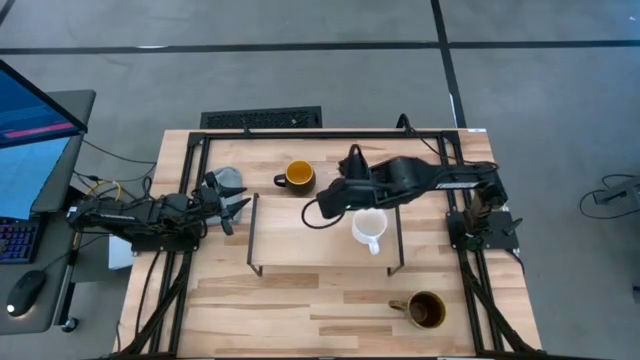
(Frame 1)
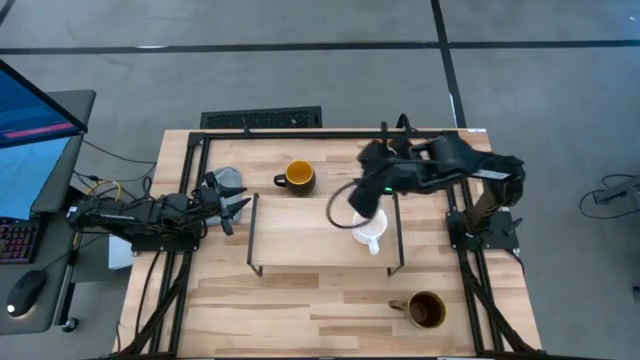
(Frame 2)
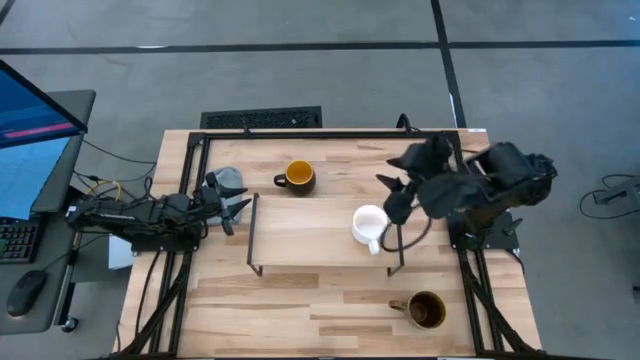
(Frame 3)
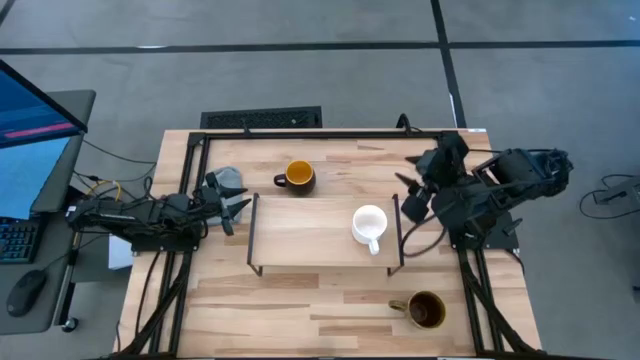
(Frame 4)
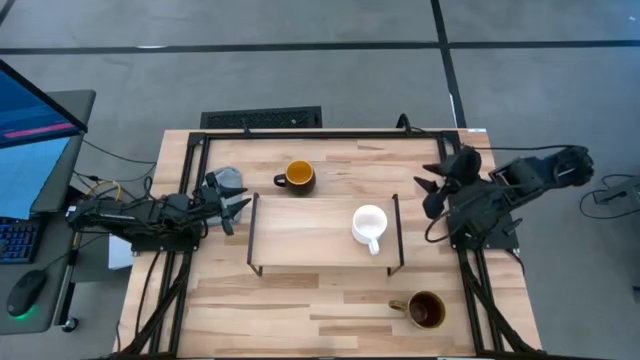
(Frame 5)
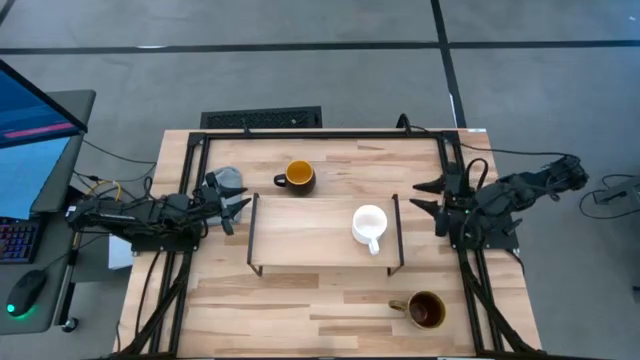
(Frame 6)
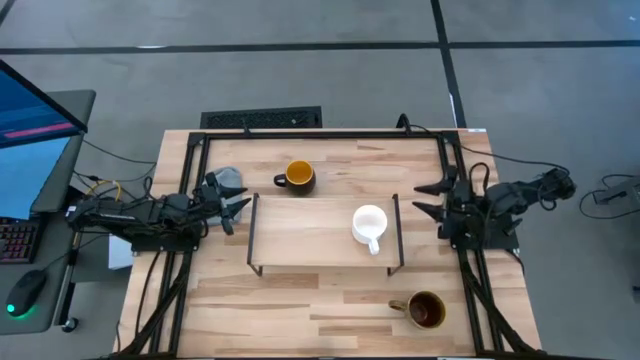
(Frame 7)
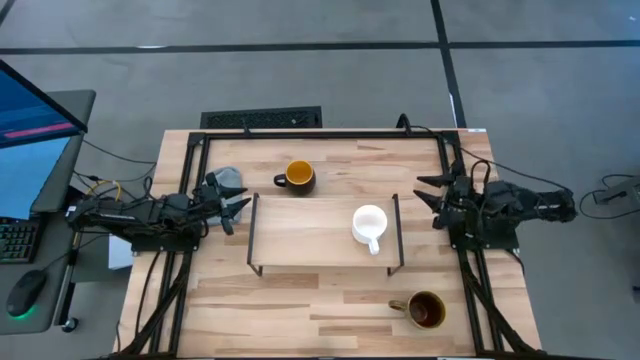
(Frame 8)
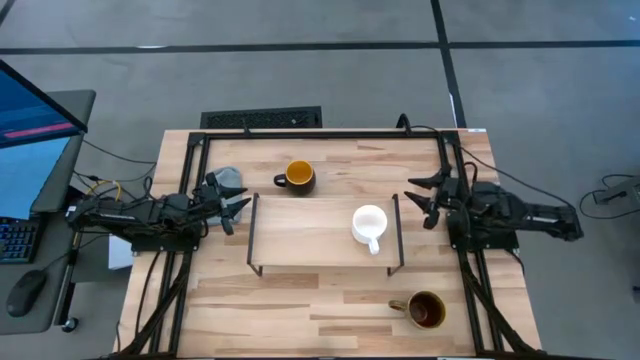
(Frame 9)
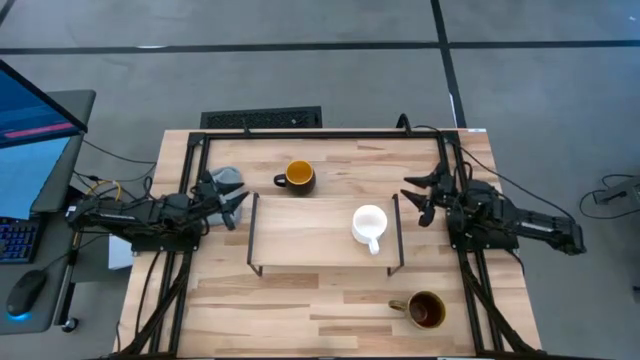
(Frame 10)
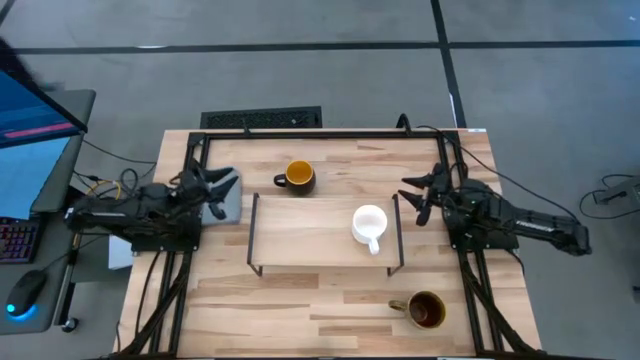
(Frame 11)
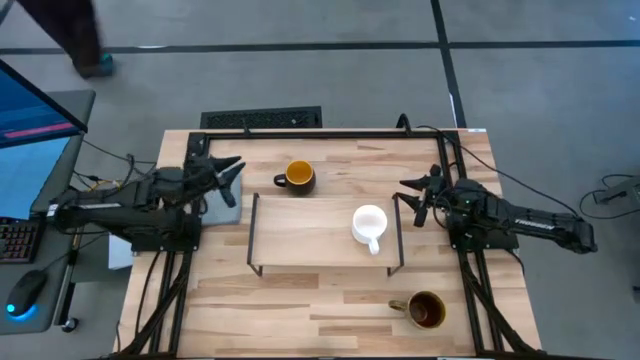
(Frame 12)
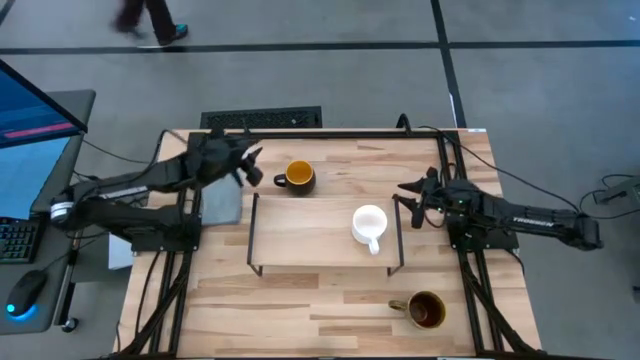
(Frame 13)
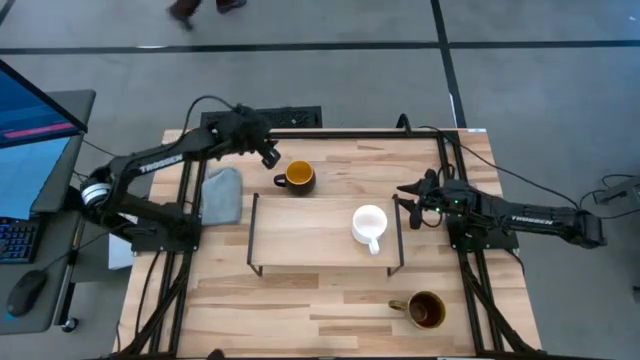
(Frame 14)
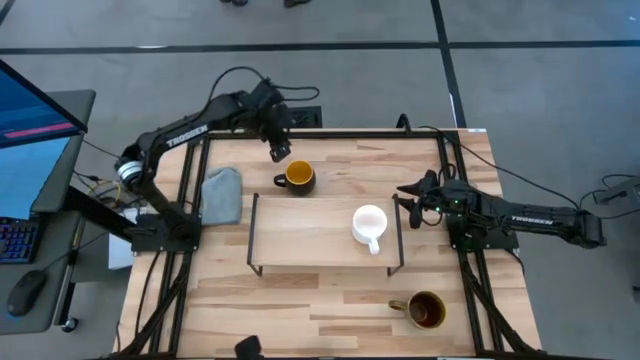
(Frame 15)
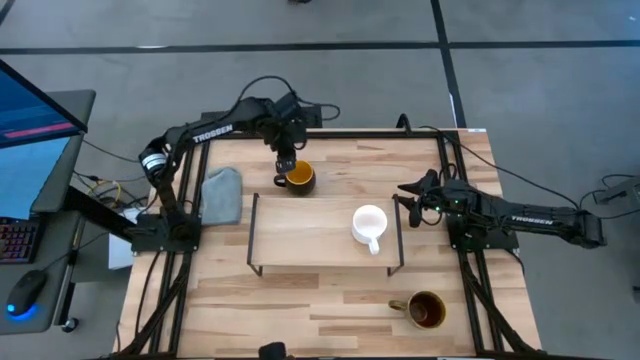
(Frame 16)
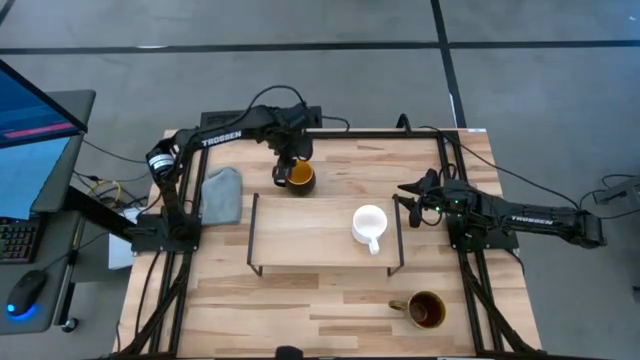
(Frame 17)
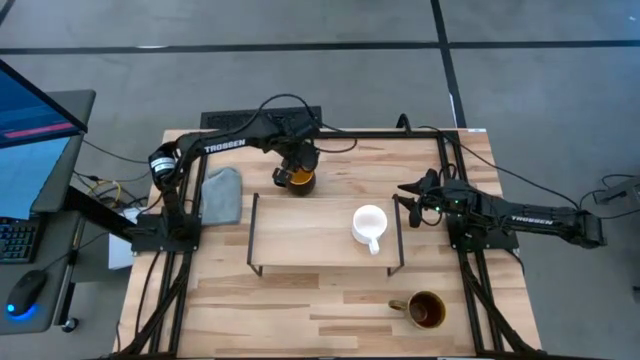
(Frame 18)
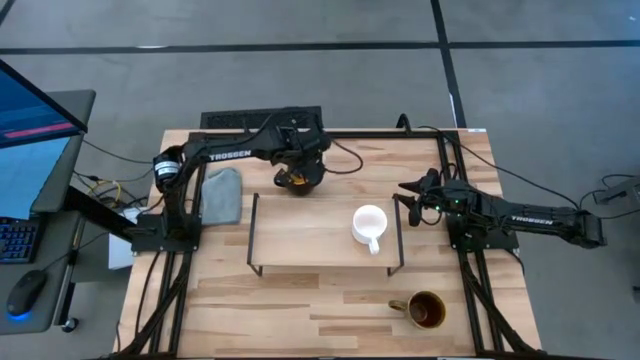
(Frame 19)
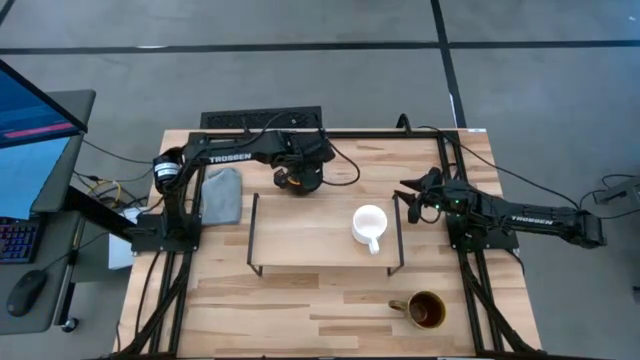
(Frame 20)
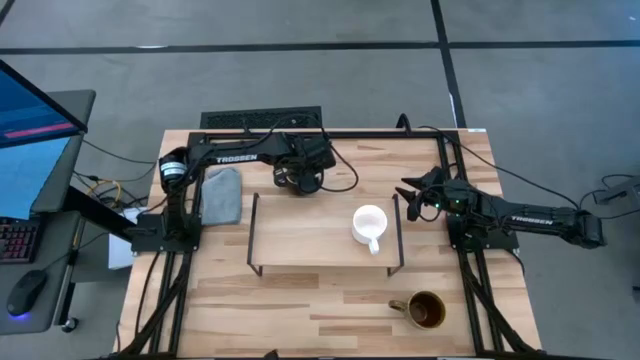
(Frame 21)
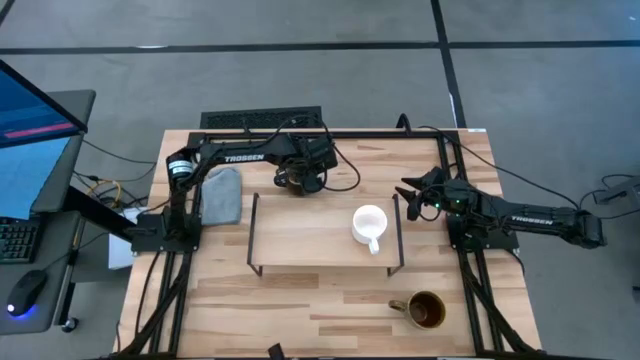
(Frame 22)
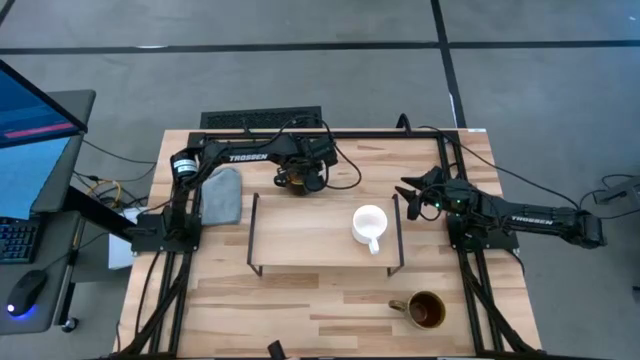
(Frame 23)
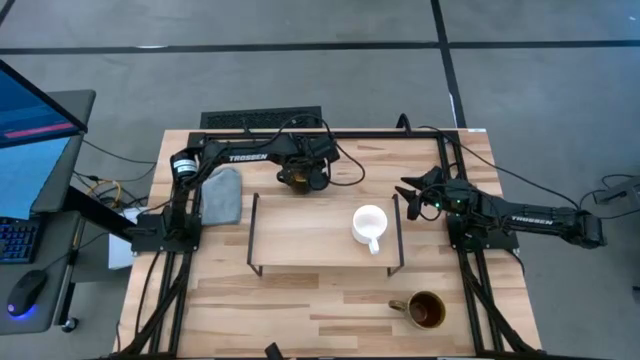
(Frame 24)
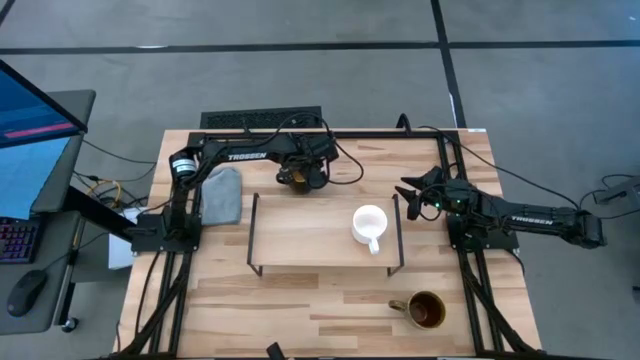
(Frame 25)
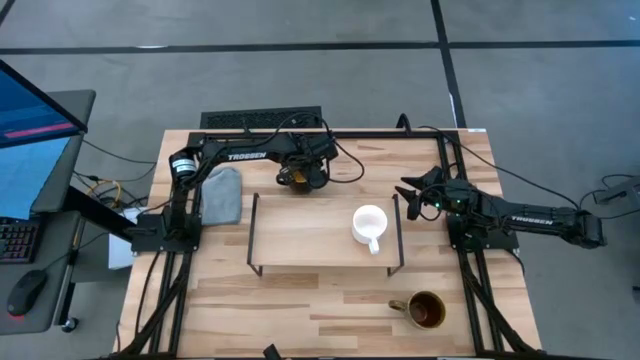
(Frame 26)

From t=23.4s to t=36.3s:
Task: Stack small to large cups/mugs on shelf
Put the black mug on the shelf
